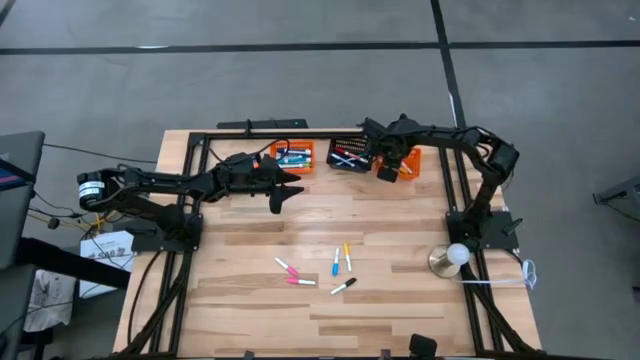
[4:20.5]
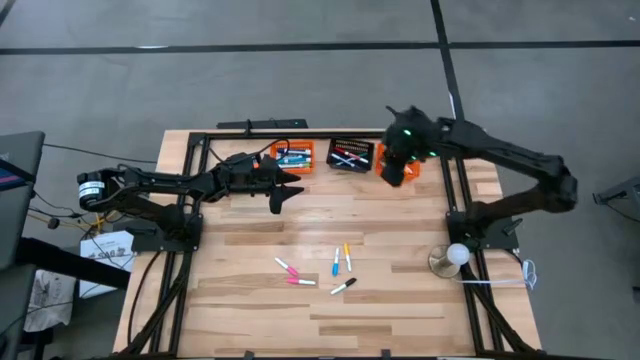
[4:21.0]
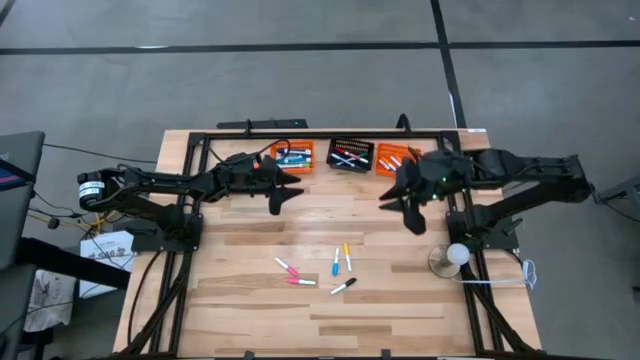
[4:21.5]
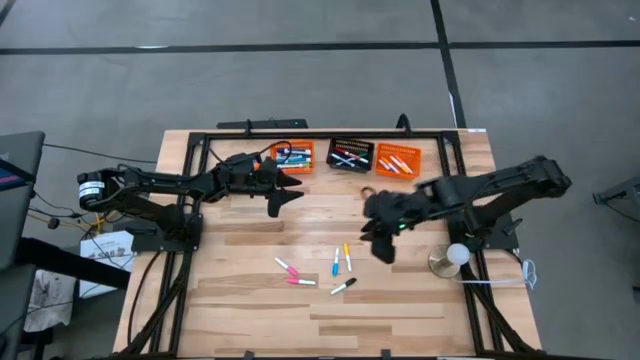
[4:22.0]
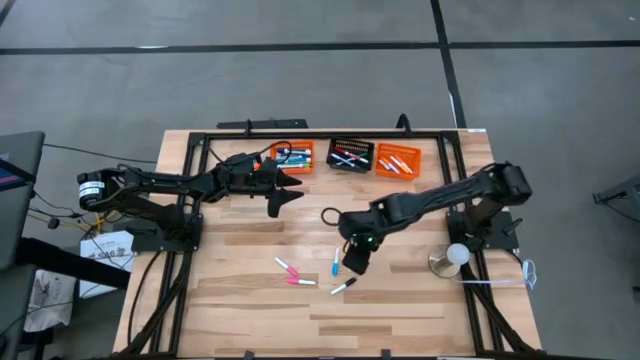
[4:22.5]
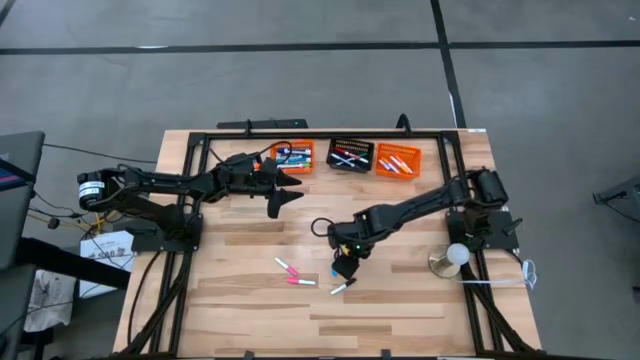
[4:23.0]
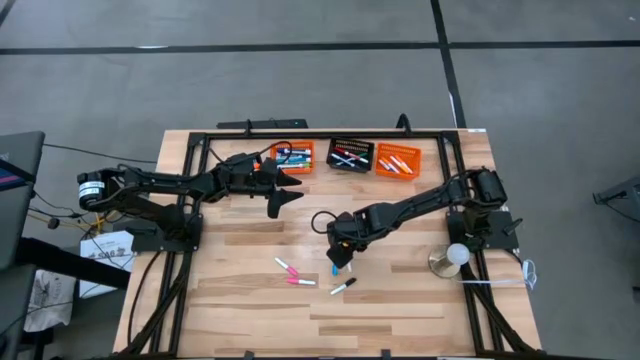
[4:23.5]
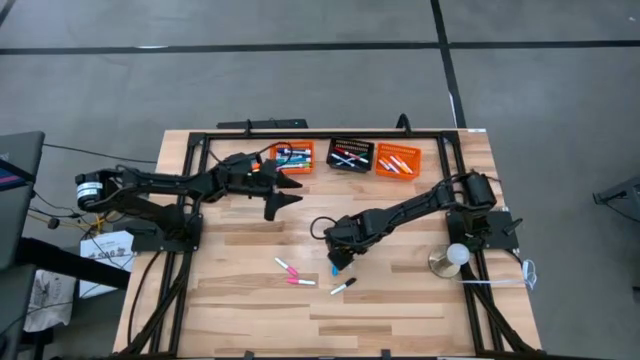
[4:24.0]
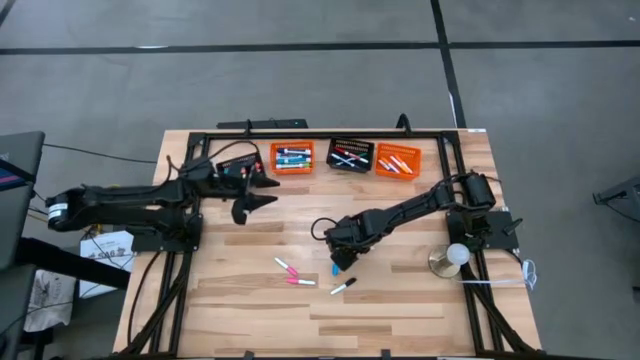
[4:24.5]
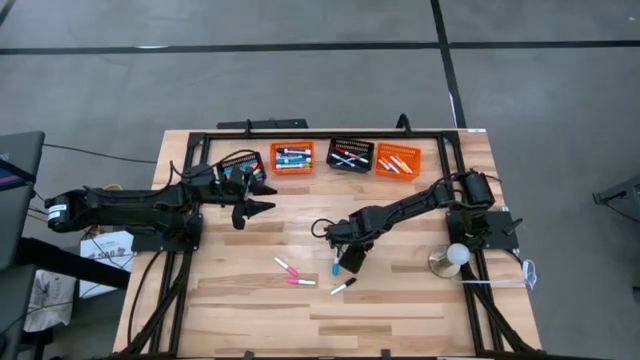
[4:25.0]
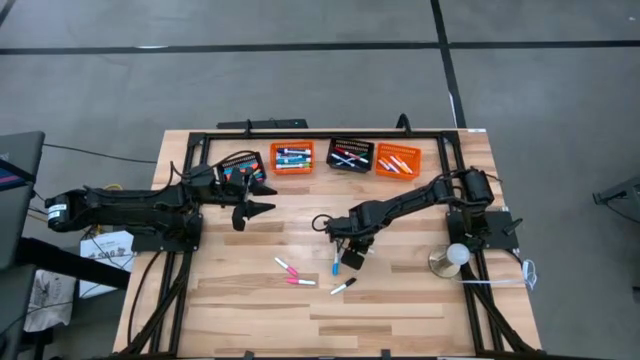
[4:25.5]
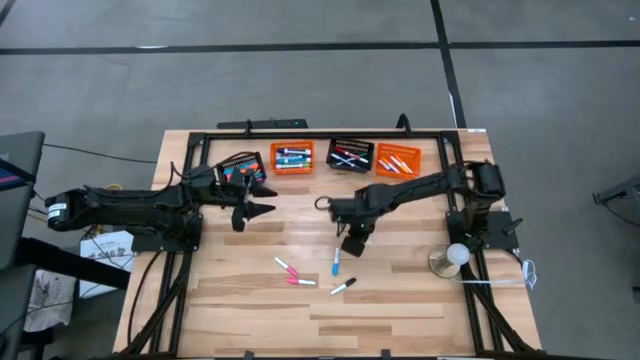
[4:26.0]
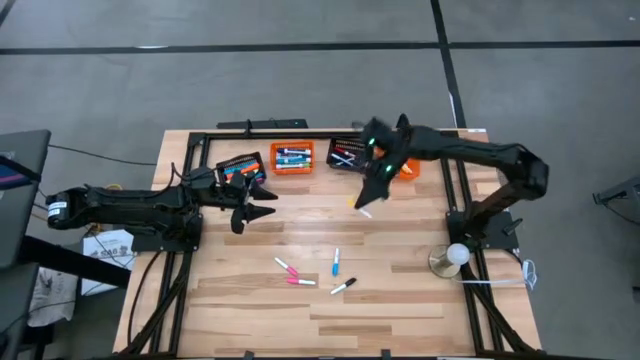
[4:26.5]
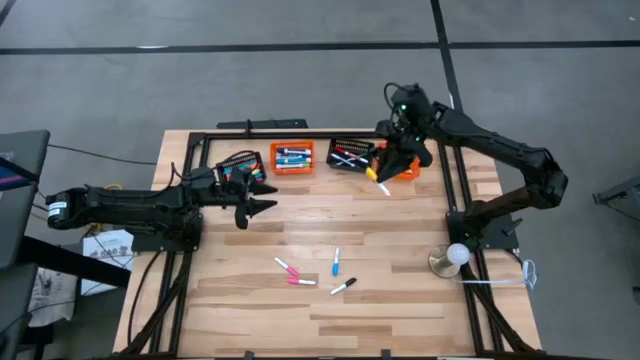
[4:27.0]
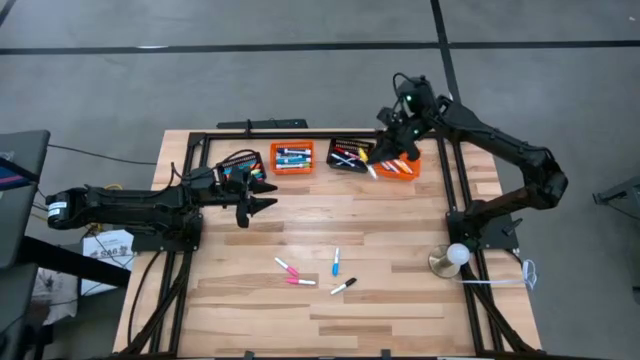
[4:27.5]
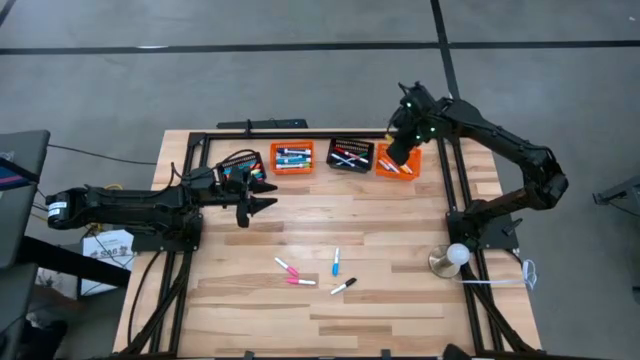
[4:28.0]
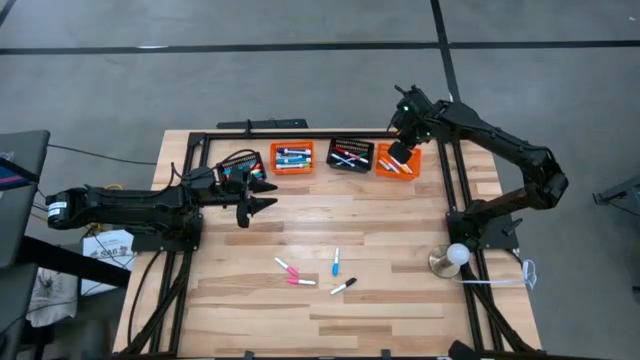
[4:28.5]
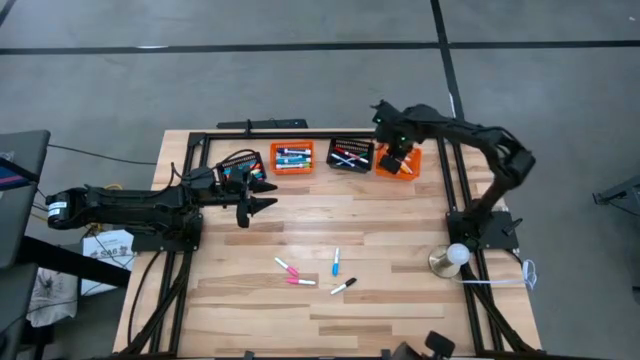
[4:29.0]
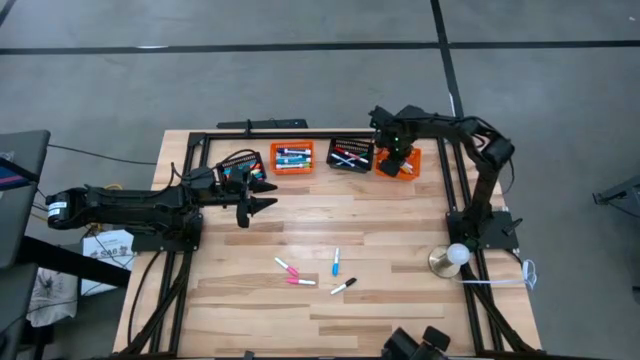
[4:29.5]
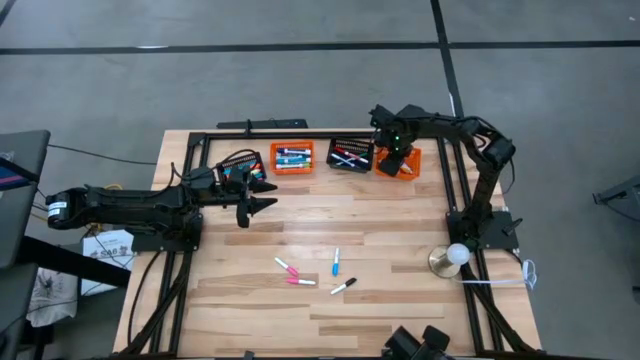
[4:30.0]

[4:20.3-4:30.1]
Task: Pick & Place Markers
Put the small yellow highlighter pen into the right orange bin

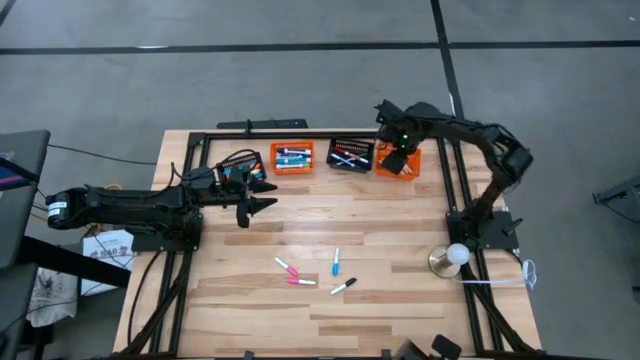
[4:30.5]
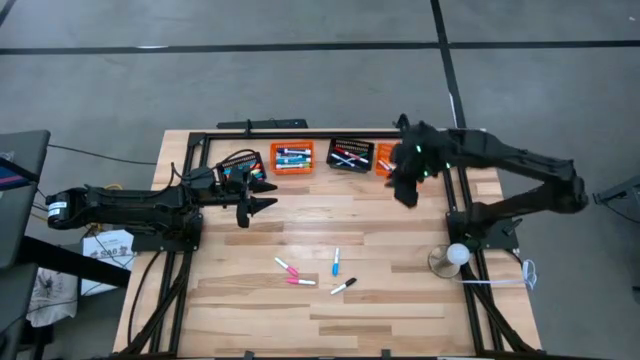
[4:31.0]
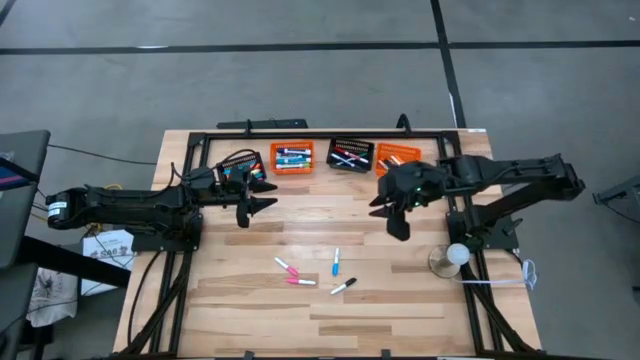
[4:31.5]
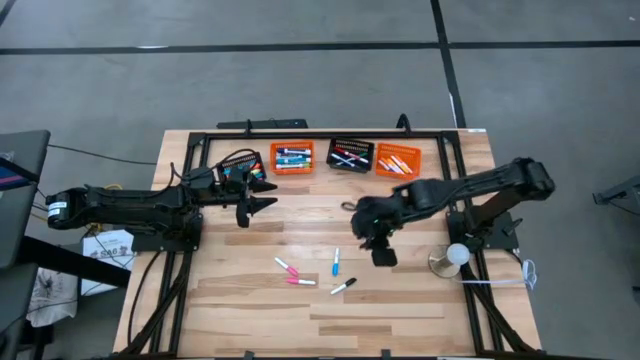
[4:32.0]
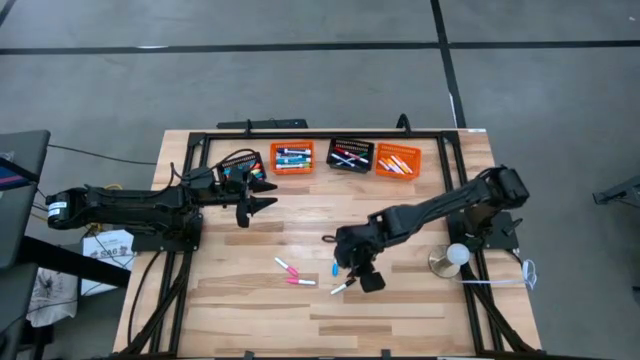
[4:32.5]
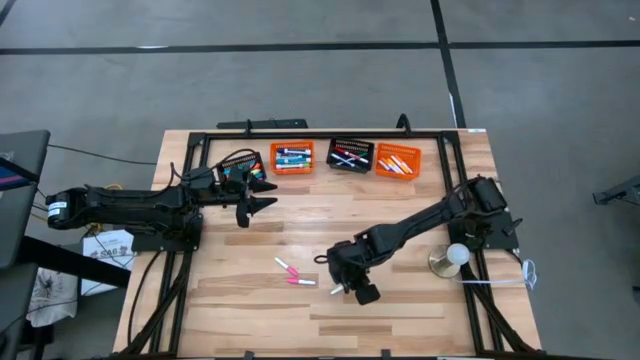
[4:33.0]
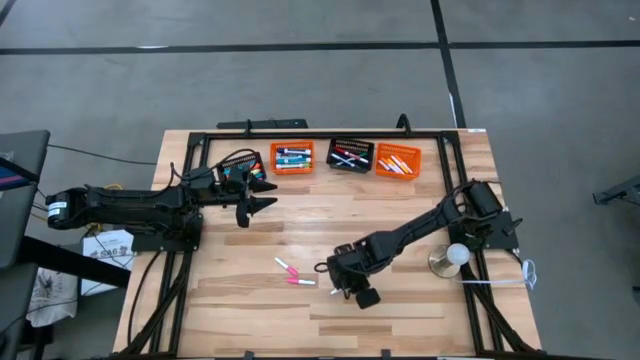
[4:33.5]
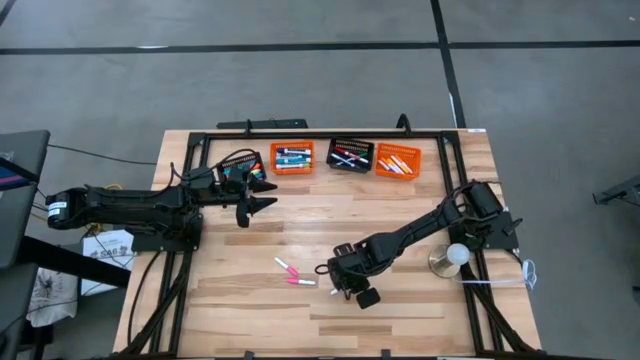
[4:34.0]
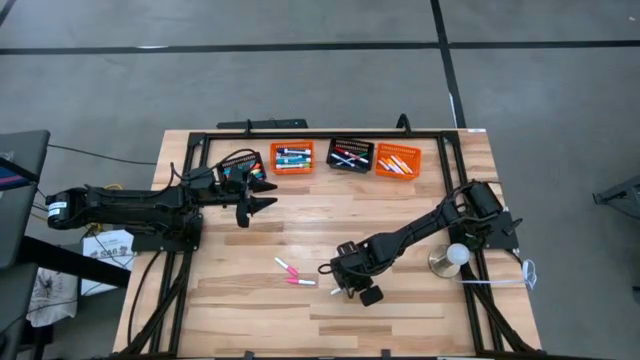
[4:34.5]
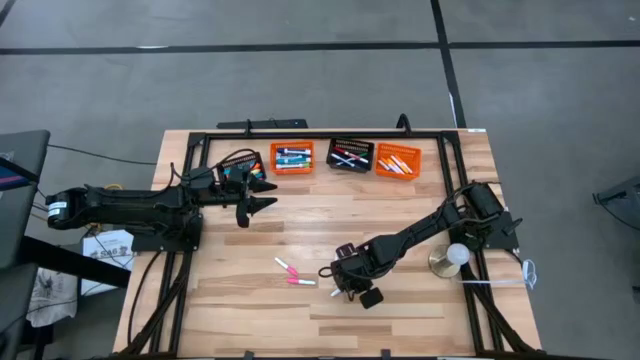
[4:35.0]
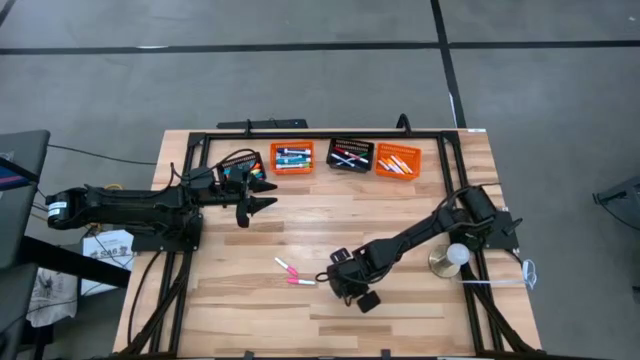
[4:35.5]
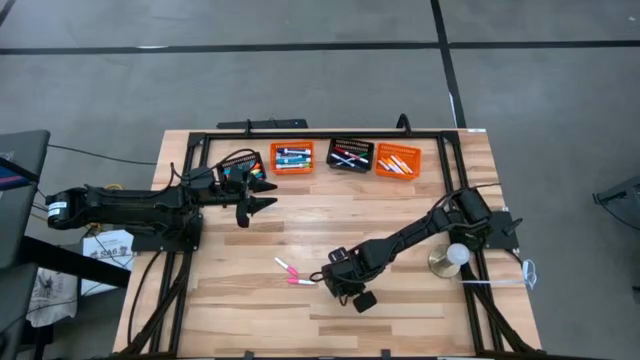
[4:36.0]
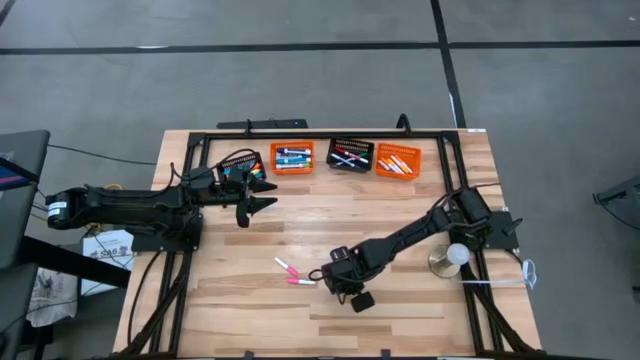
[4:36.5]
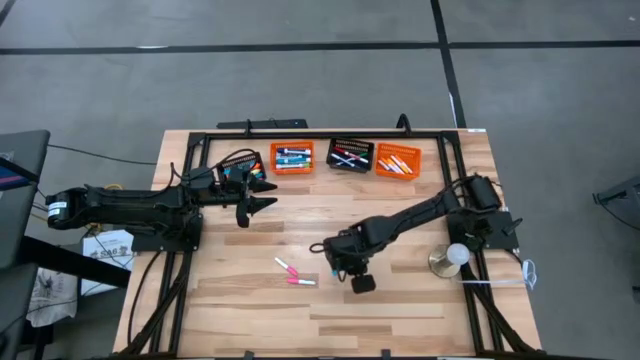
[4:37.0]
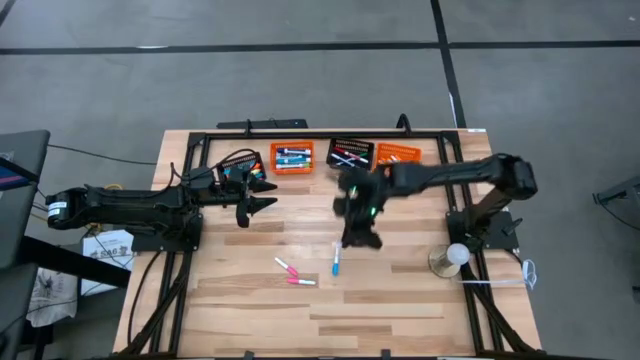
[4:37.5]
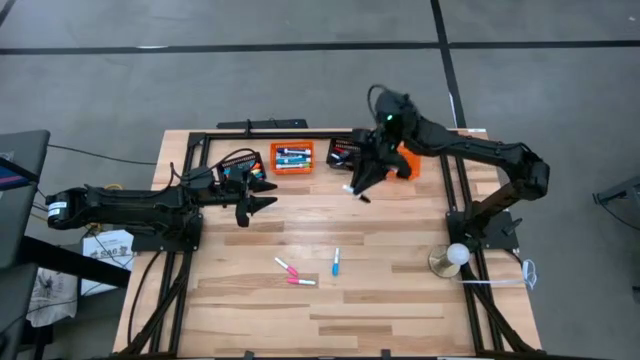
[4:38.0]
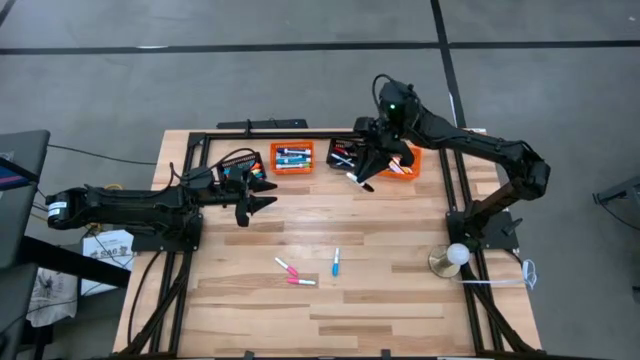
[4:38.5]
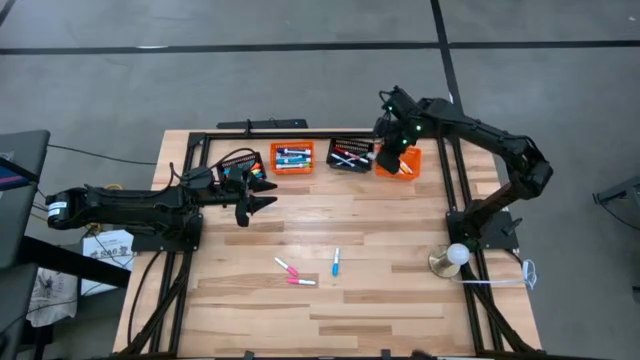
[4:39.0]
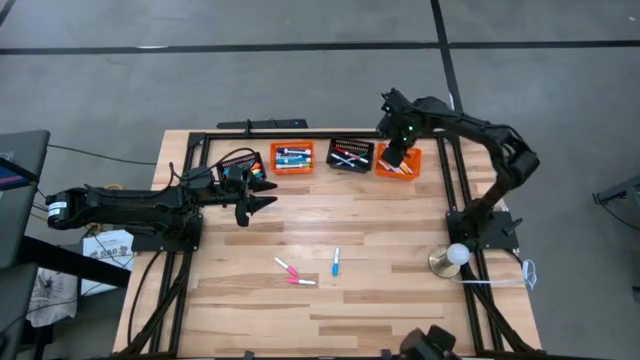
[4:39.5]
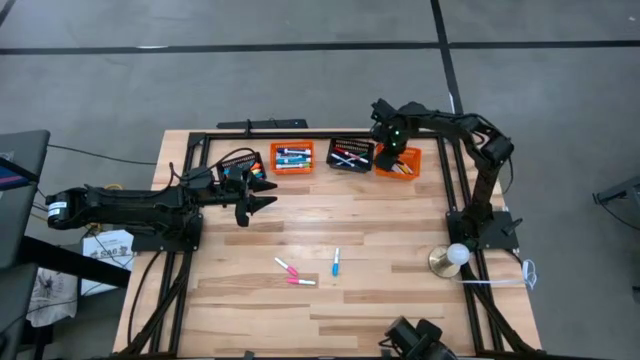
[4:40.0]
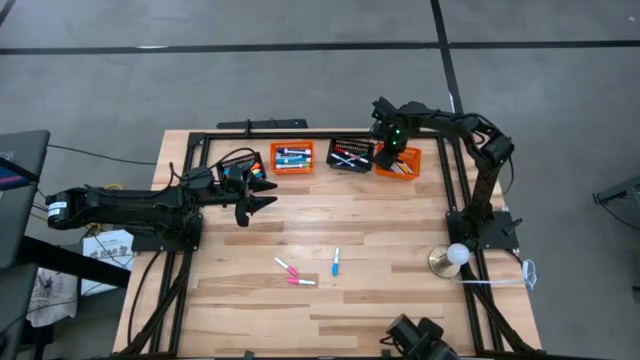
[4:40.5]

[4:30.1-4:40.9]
Put the small black highlighter pen into the right orange bin

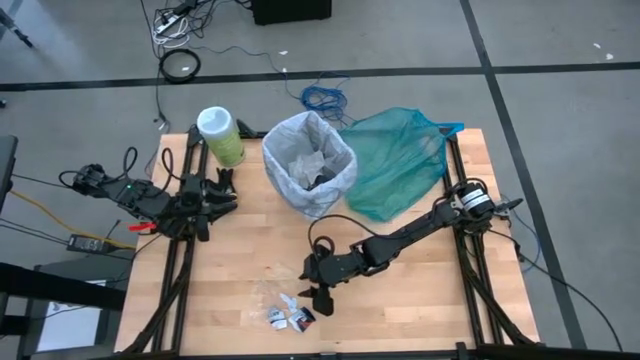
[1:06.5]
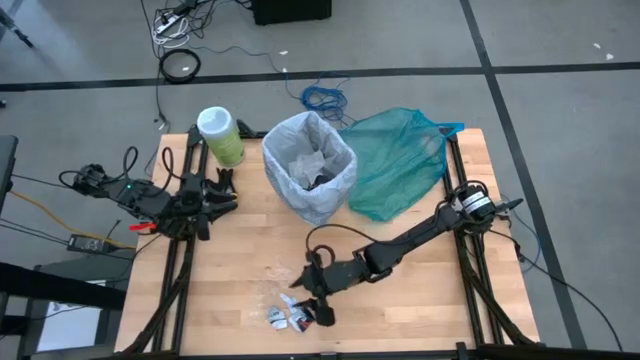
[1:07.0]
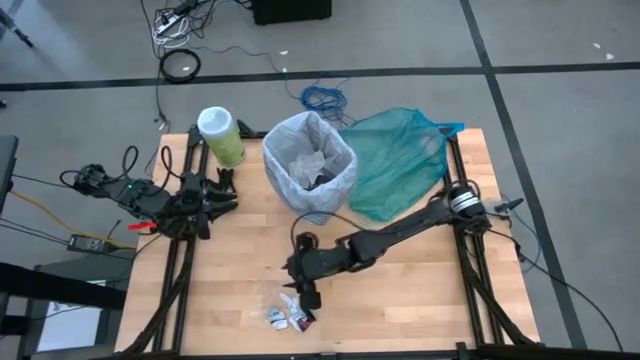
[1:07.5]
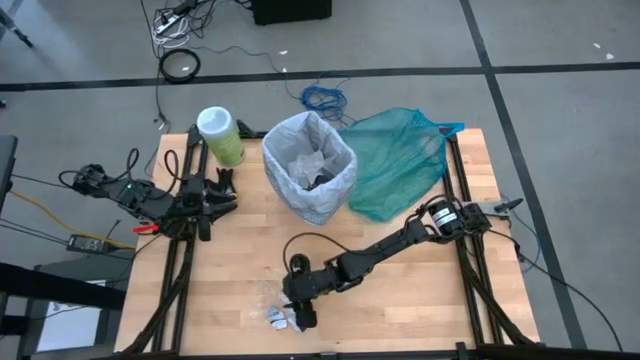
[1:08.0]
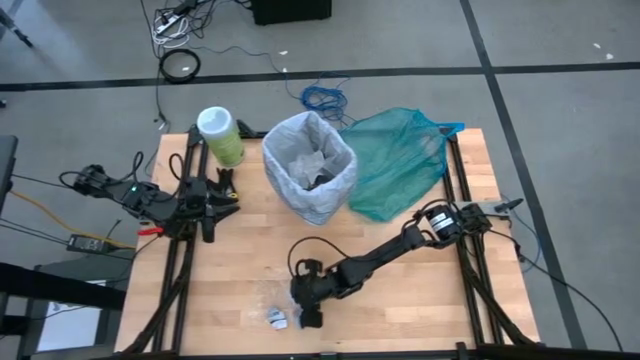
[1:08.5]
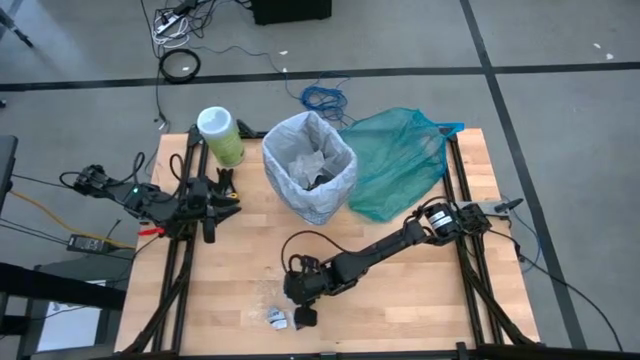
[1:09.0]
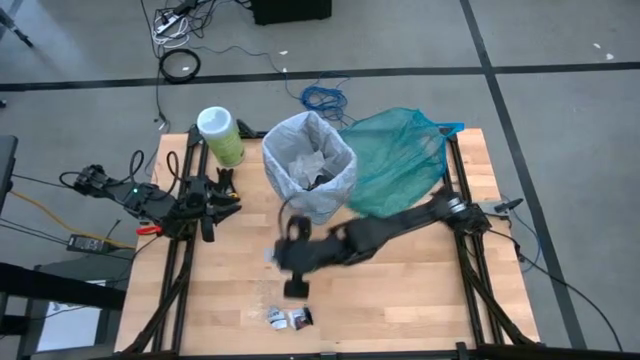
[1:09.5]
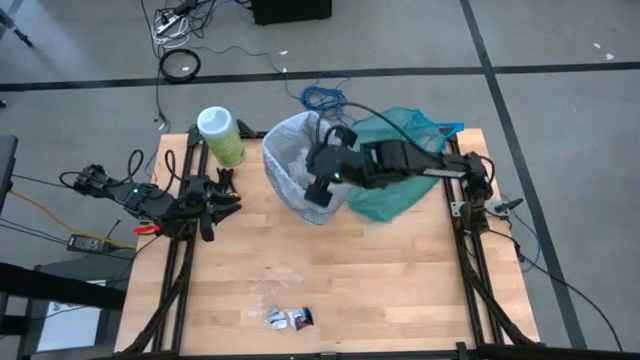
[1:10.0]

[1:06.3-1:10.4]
Task: place trash/remove bag and relplace
Put the white paper into the trash bin
